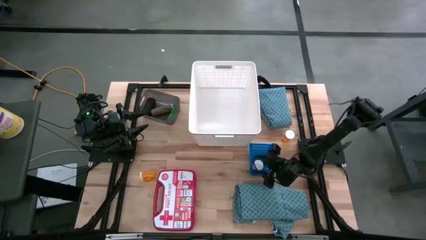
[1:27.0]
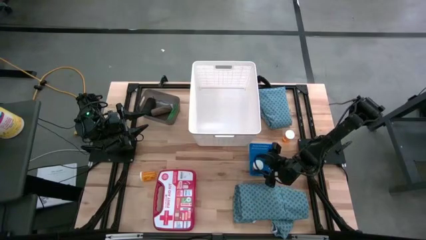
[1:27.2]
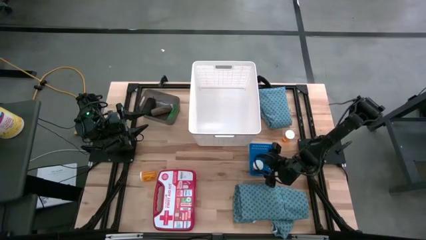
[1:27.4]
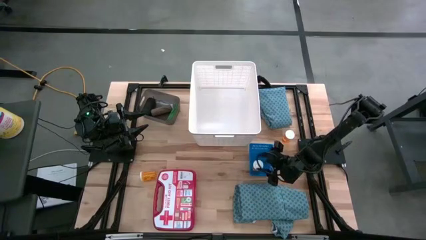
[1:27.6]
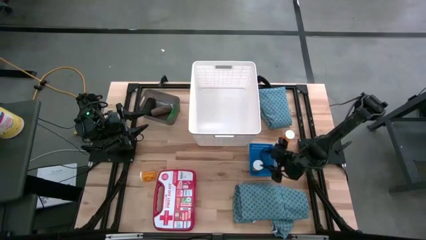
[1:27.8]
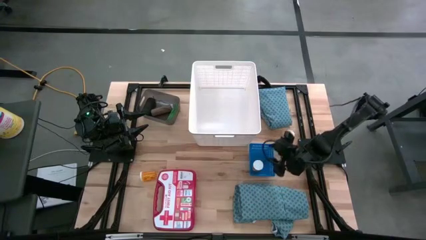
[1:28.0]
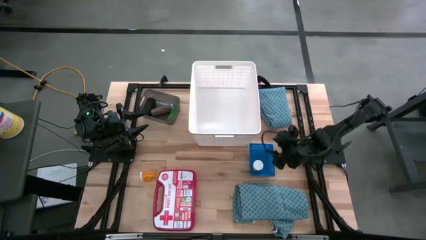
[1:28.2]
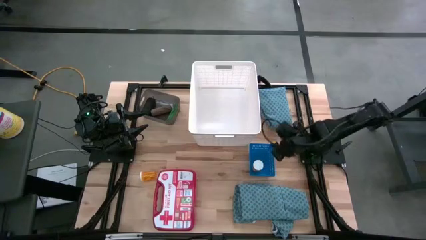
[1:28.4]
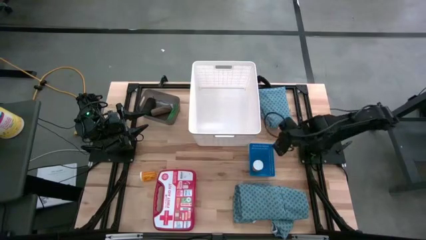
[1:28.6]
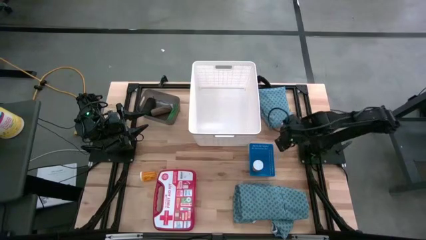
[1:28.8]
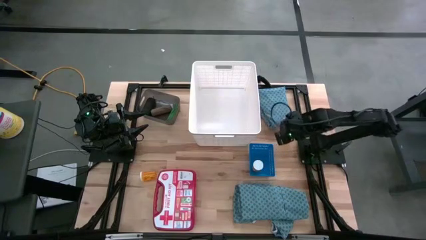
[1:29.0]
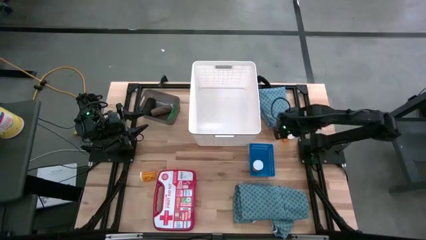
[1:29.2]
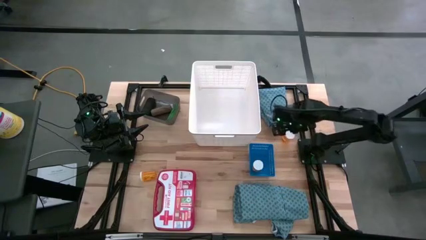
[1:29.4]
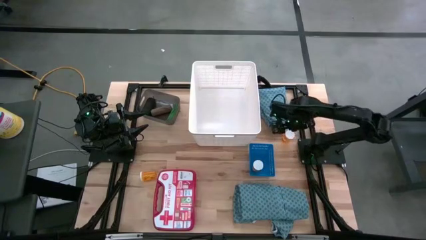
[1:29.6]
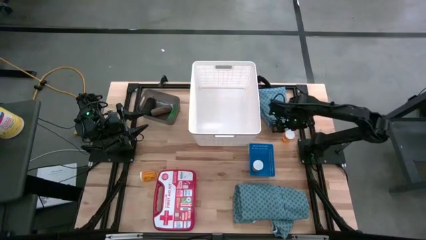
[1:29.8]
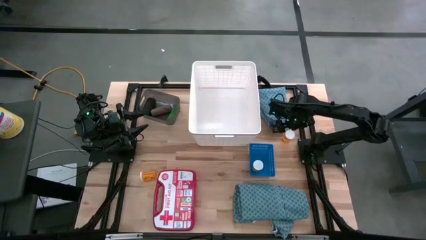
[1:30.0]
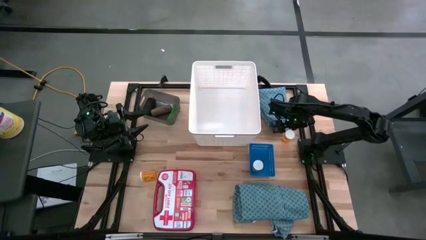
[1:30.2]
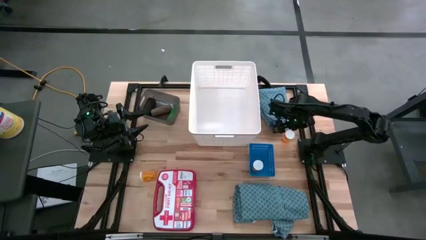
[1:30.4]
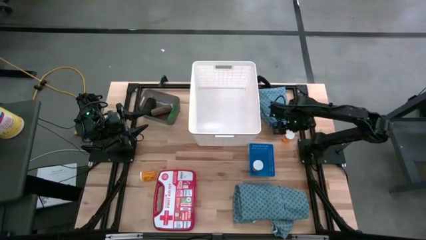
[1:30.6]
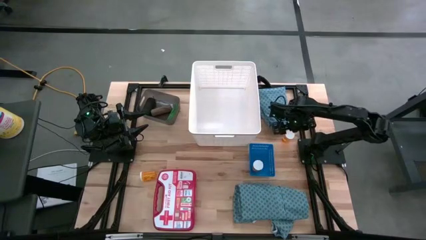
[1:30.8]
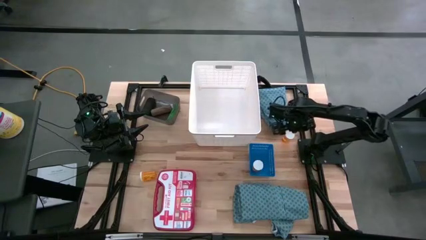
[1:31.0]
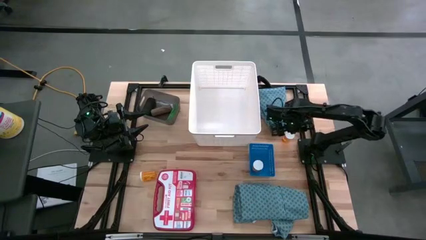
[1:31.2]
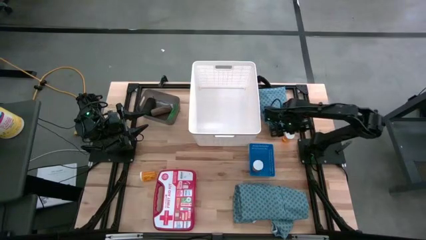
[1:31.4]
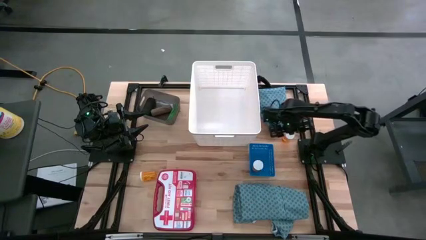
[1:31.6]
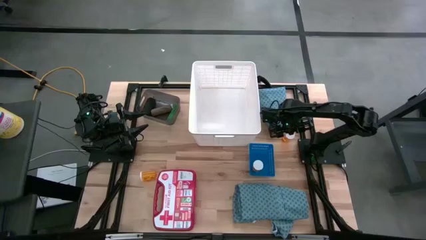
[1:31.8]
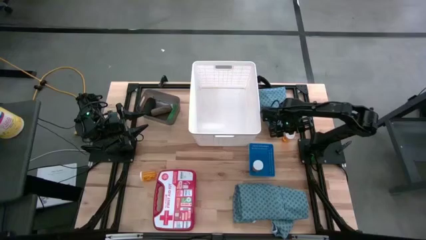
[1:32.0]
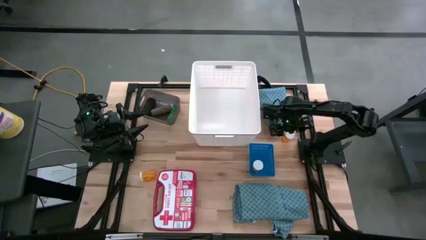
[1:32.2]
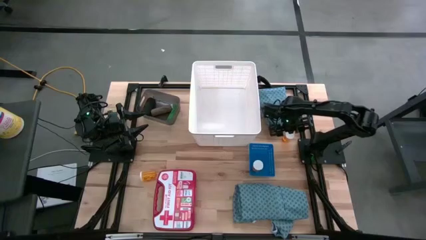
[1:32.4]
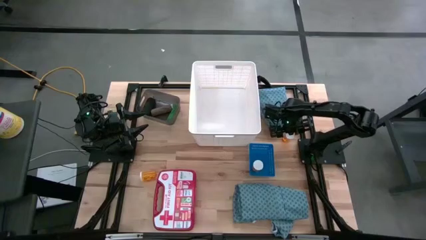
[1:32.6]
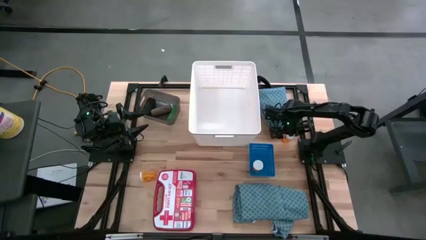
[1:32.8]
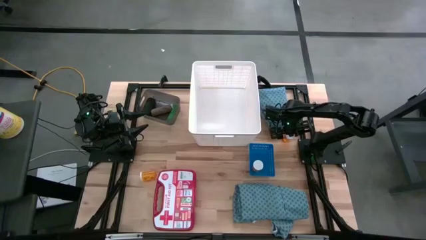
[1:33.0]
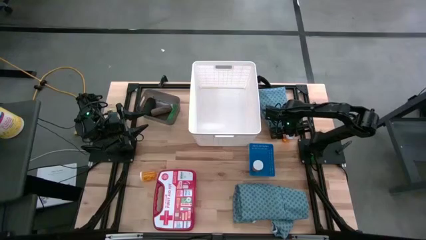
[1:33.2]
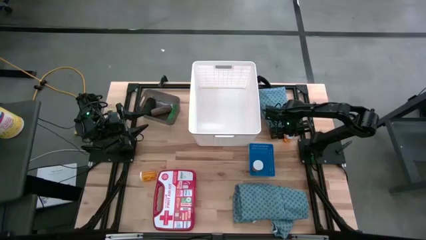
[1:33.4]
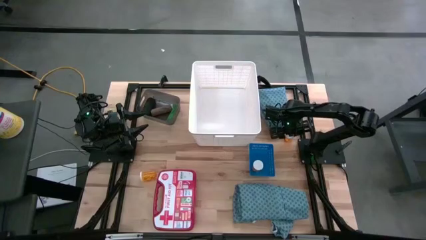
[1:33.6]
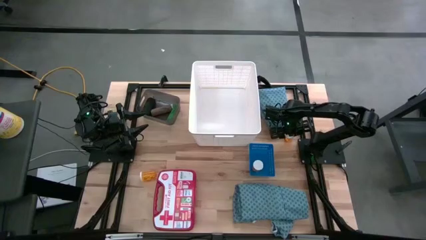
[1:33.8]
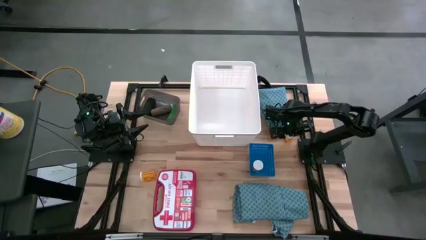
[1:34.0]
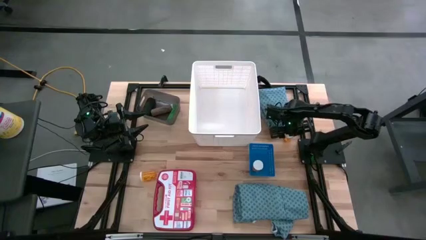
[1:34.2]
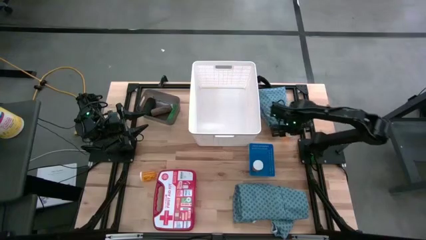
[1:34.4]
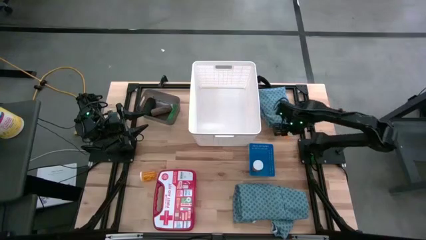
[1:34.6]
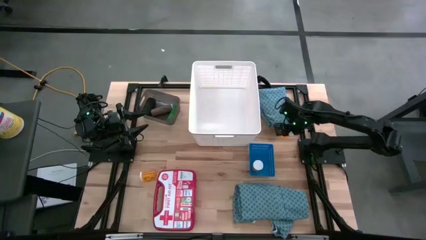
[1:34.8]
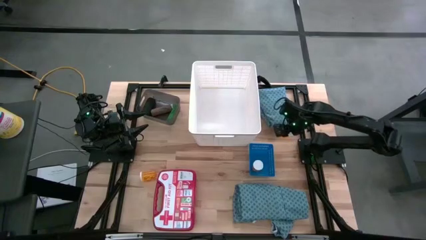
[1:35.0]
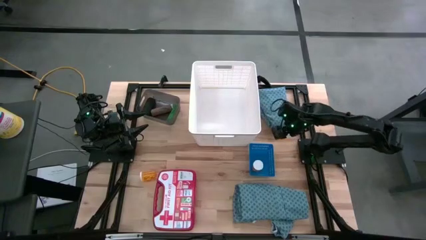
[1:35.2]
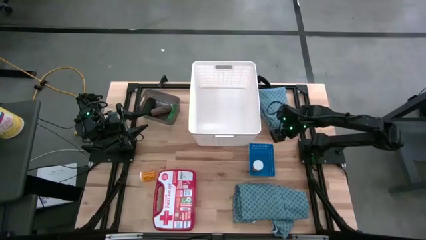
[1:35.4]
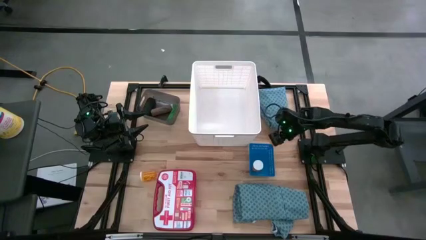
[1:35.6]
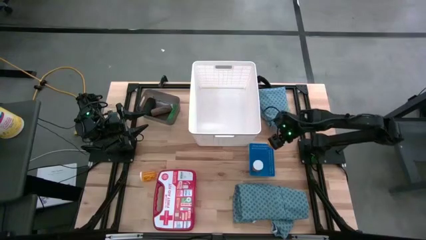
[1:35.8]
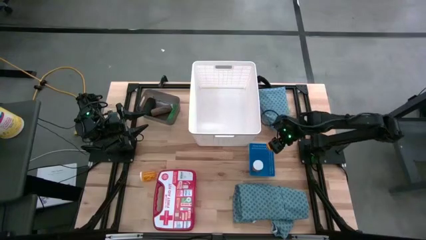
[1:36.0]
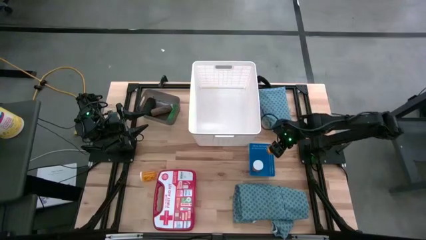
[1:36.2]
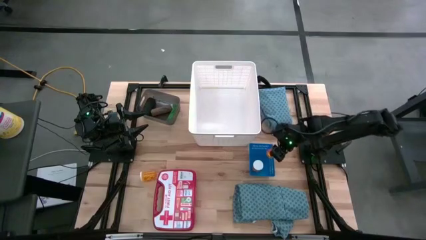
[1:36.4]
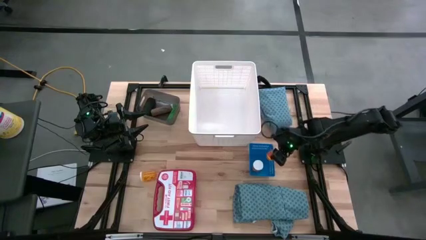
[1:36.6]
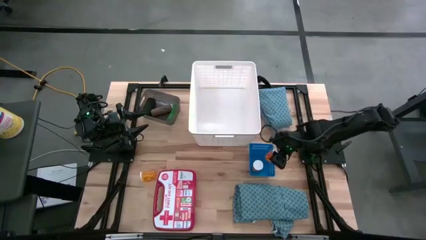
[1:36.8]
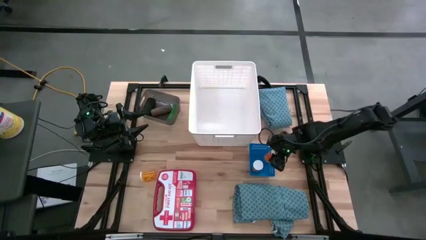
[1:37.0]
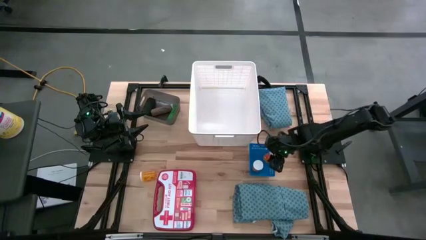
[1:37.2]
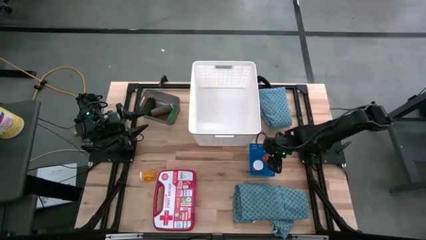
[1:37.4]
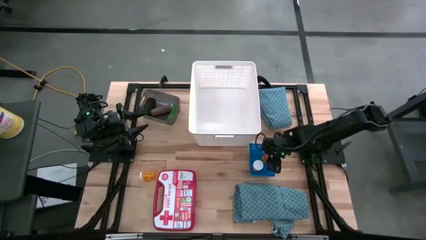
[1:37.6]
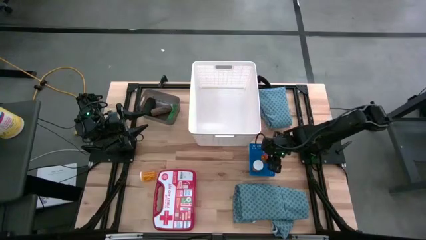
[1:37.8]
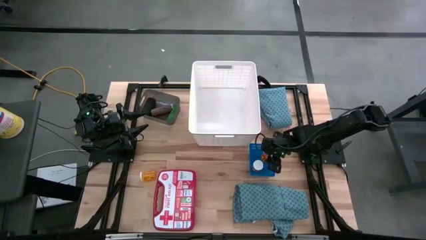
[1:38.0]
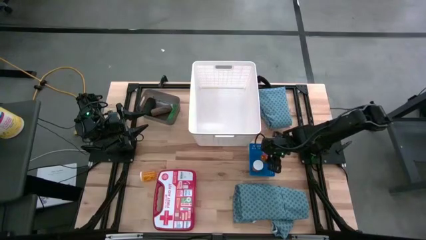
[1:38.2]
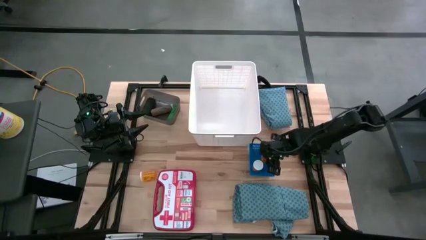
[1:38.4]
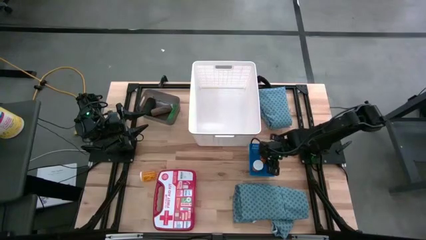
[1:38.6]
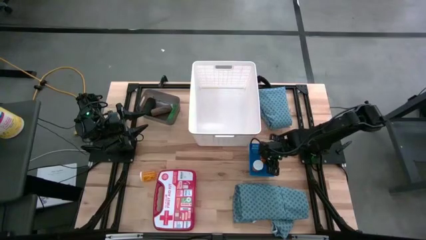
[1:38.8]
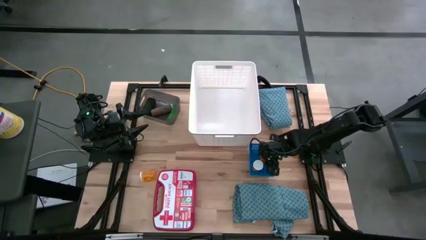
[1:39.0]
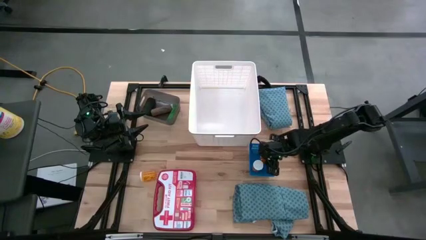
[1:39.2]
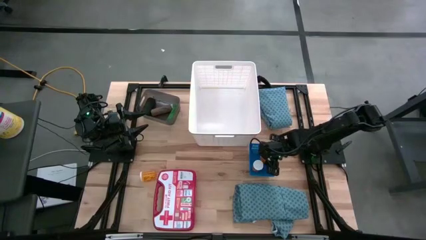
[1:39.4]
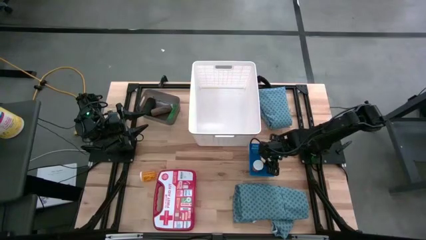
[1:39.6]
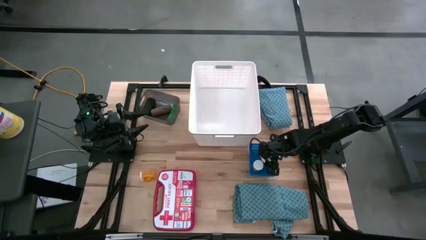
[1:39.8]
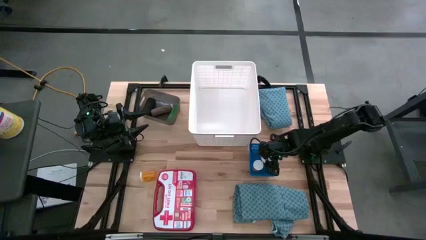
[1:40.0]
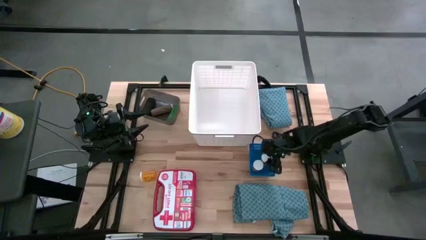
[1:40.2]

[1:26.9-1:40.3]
Task: Pick & place medical supplies in basket/bin
Put the right orange pill bottle into the blue bin

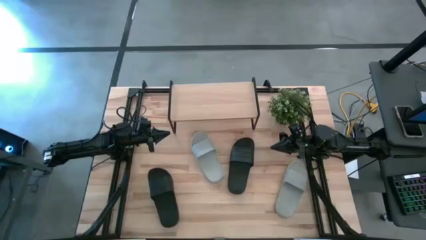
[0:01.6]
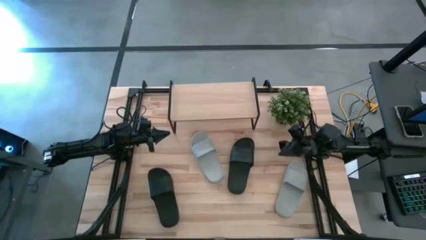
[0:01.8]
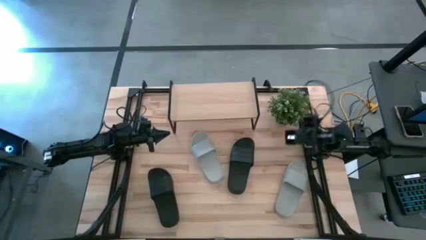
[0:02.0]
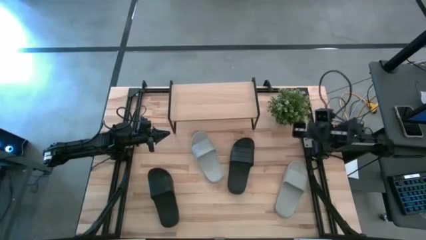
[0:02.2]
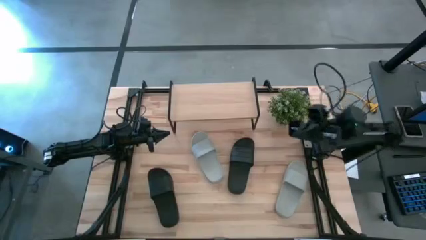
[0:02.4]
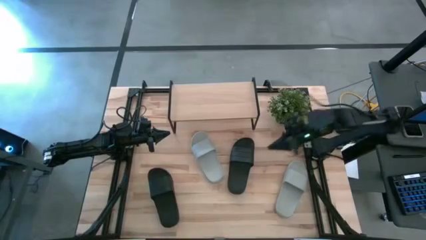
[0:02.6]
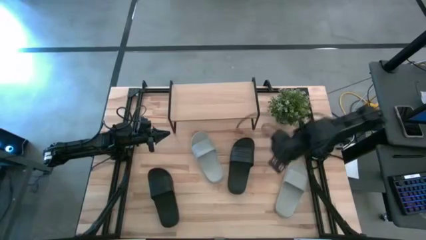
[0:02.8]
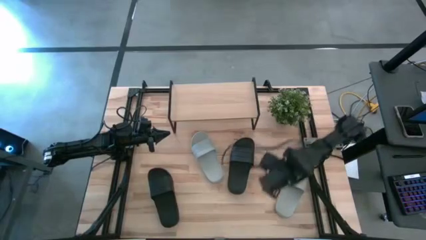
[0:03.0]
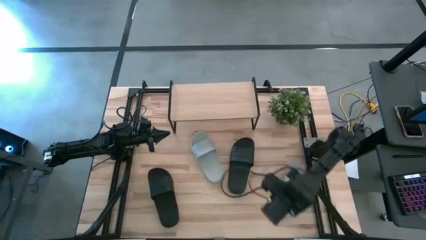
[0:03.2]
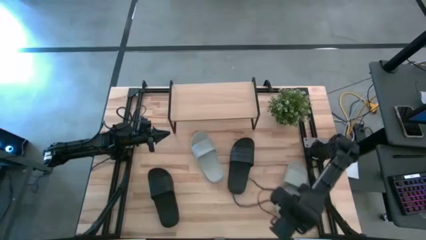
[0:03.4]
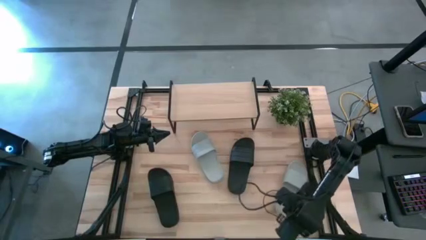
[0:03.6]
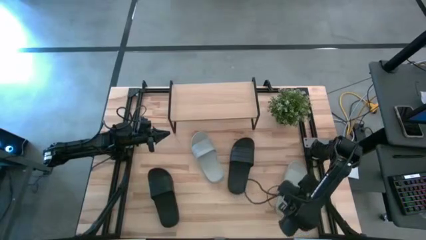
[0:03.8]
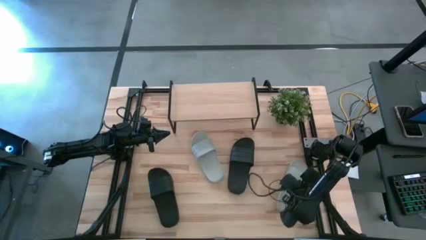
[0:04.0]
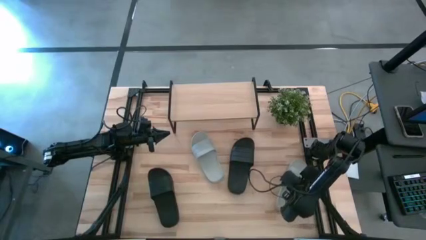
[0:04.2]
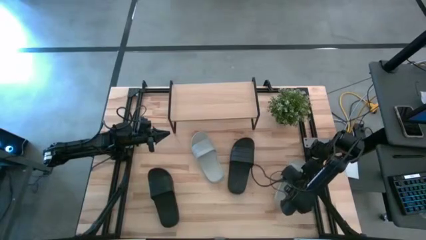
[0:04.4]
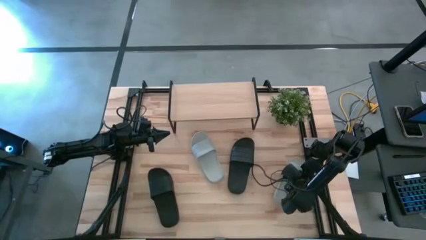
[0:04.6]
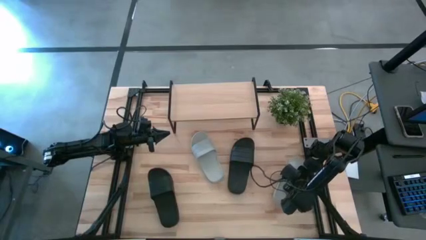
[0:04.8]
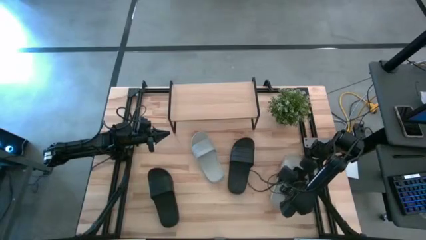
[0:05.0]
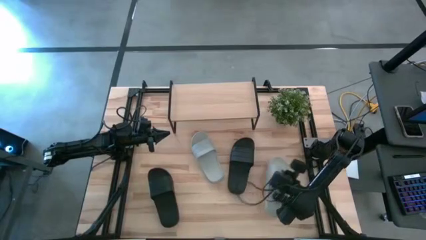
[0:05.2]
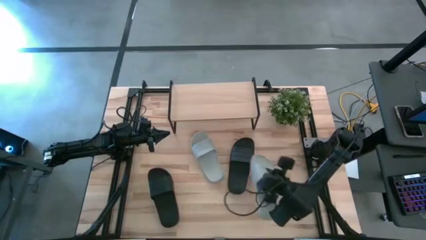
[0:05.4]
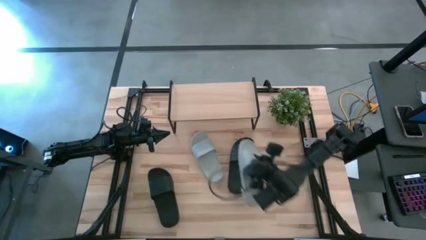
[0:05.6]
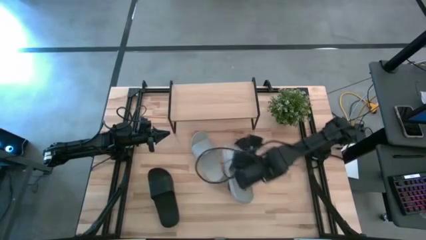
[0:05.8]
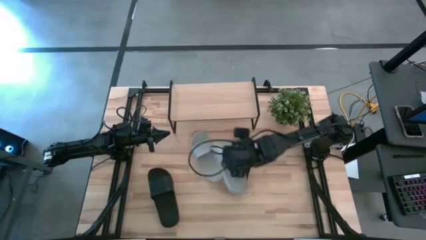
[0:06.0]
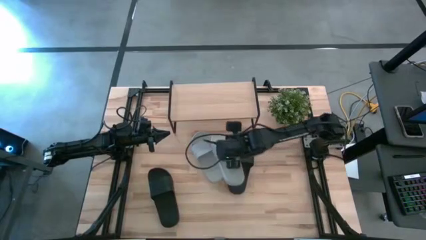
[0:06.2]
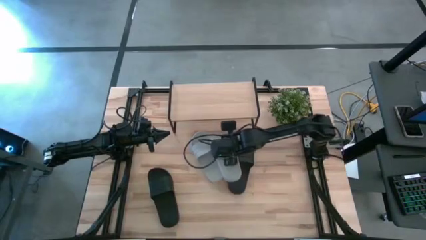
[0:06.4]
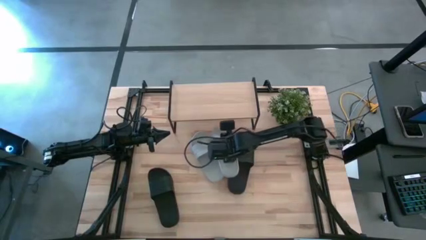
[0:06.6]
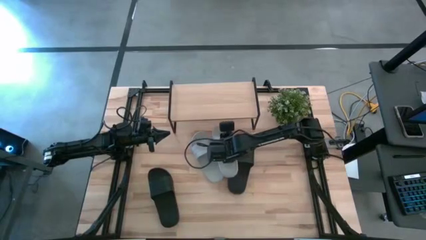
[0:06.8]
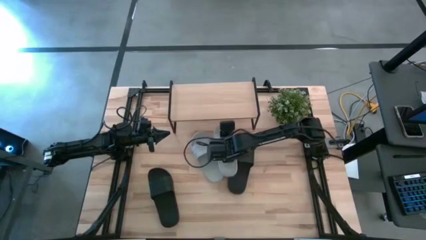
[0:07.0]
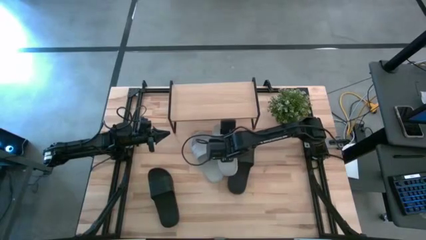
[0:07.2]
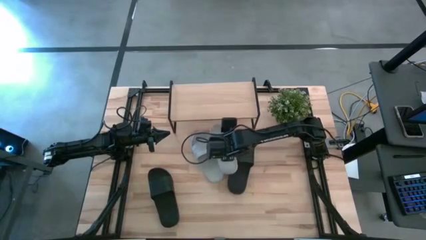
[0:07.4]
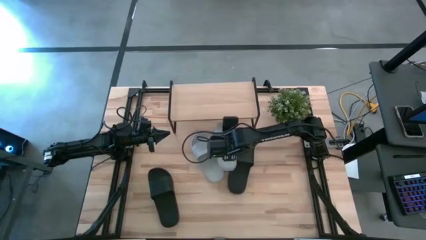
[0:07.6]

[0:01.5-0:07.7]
Task: Pick and place slides into the shelf
Move the right gray slipper to the center of the table
